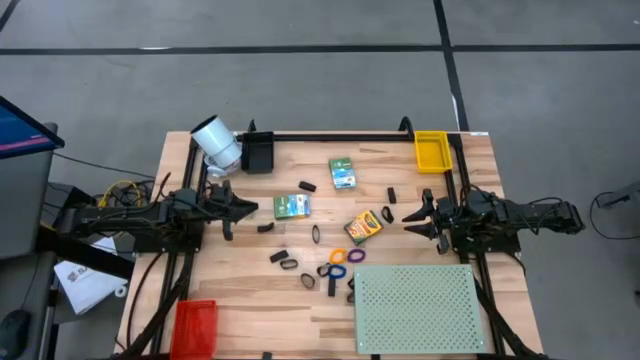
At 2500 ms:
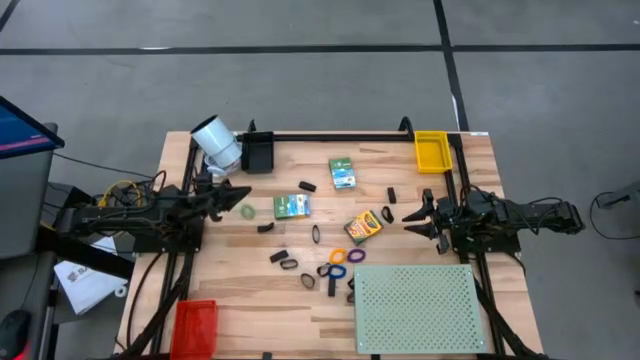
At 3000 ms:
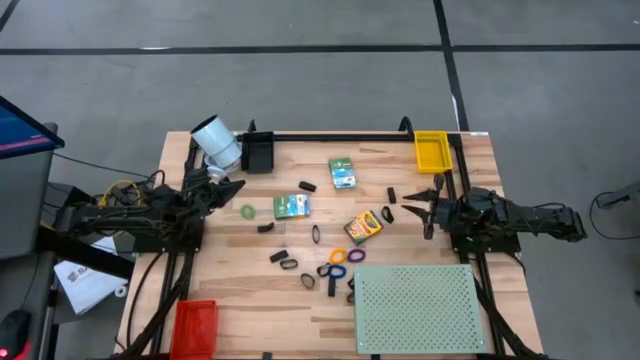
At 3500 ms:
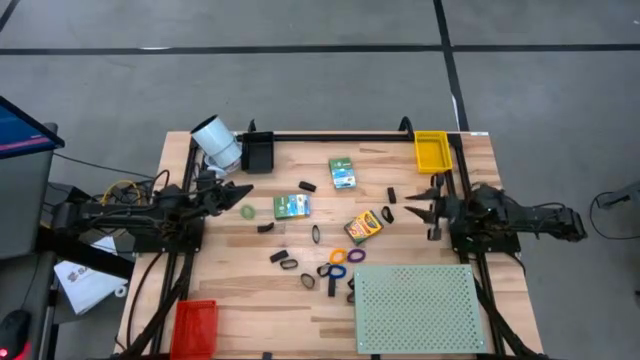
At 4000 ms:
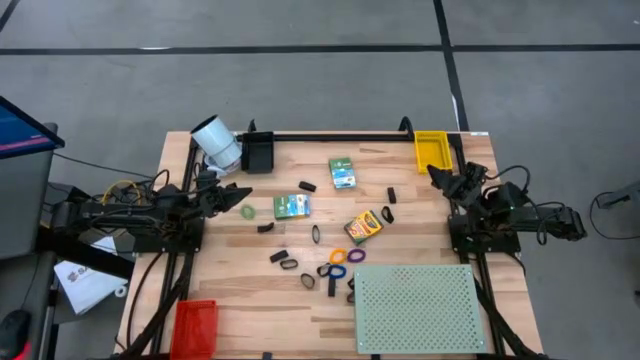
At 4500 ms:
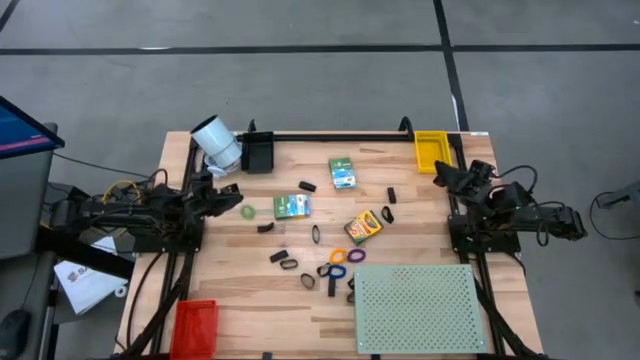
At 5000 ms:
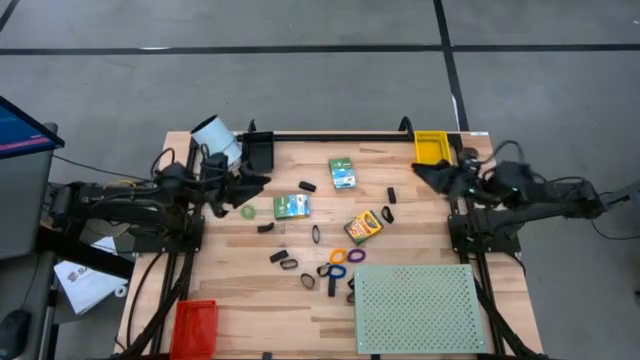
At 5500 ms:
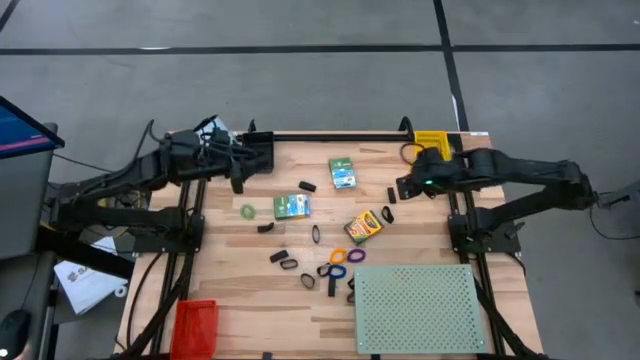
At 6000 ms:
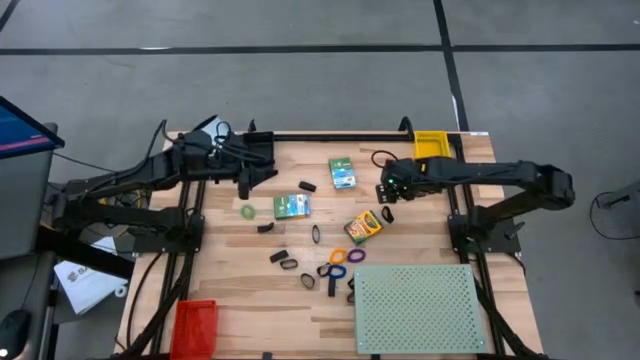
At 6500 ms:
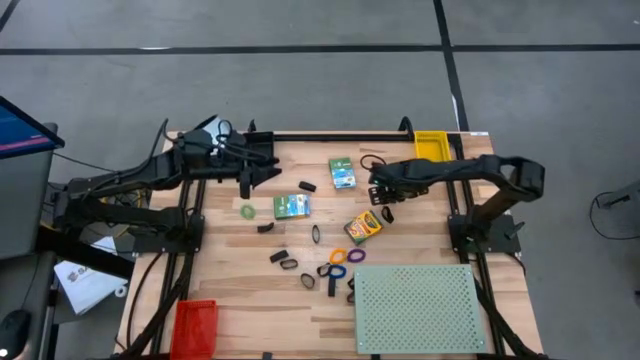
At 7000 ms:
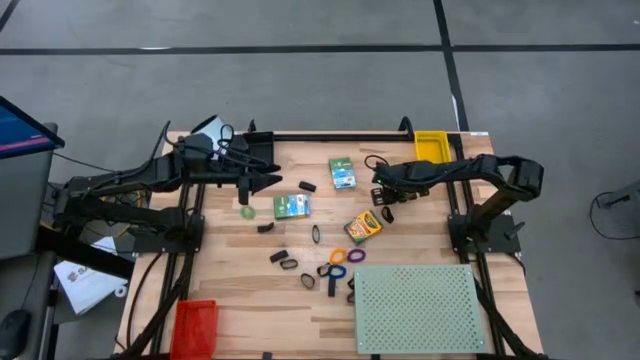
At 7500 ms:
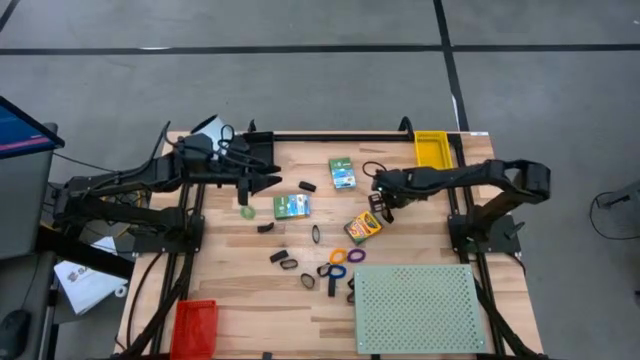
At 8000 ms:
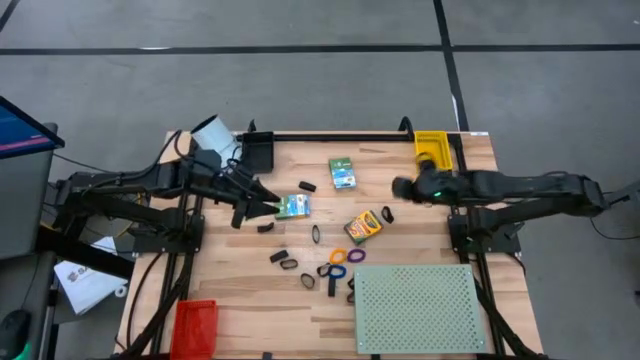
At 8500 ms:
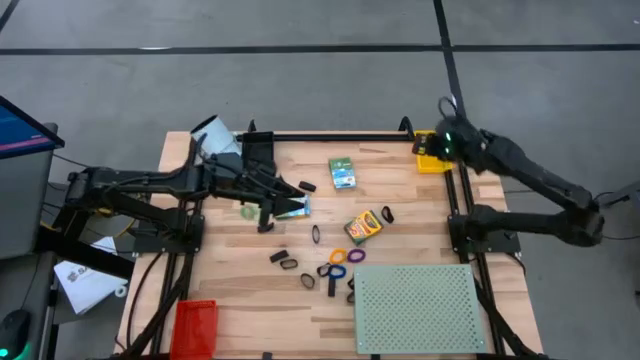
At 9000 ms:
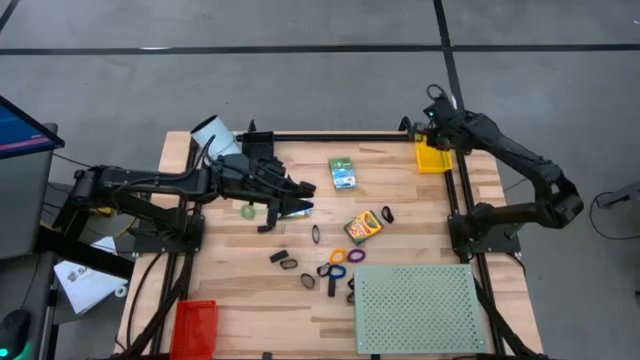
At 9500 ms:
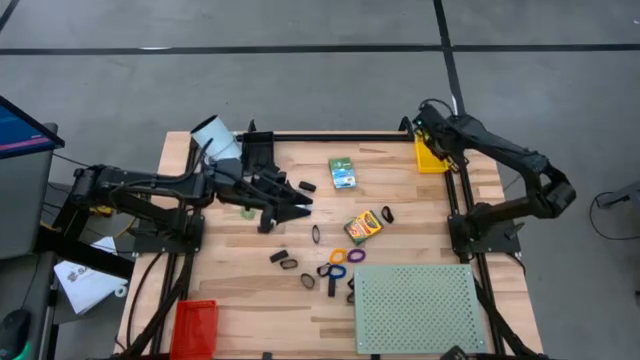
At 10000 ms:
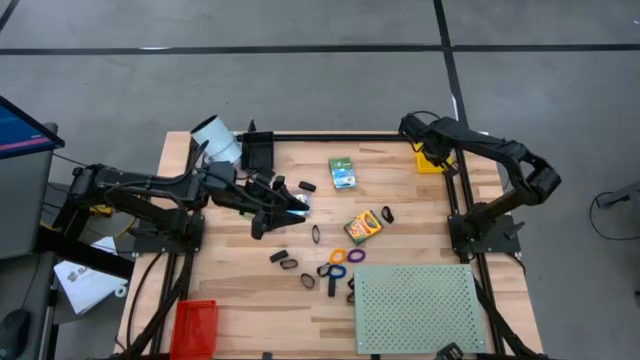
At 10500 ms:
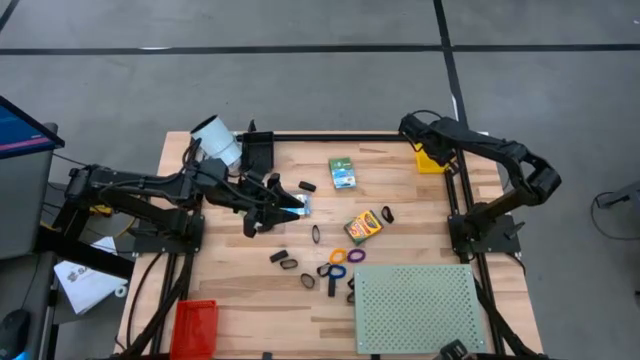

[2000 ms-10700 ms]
Task: Pick & Place Office Desk Supplies
Put the black rubber band into the yellow bin

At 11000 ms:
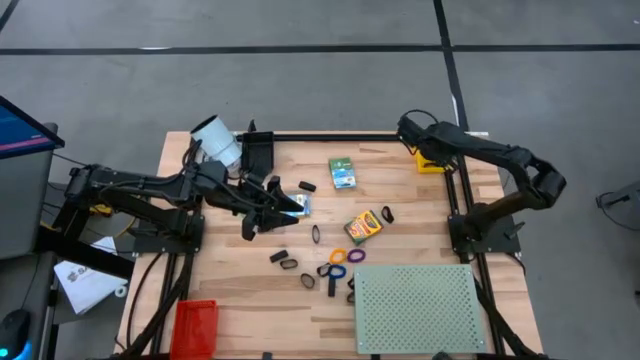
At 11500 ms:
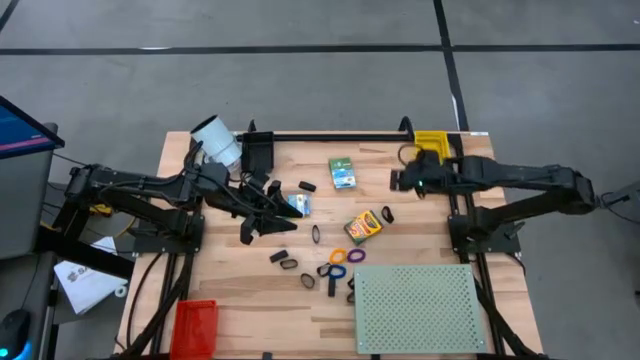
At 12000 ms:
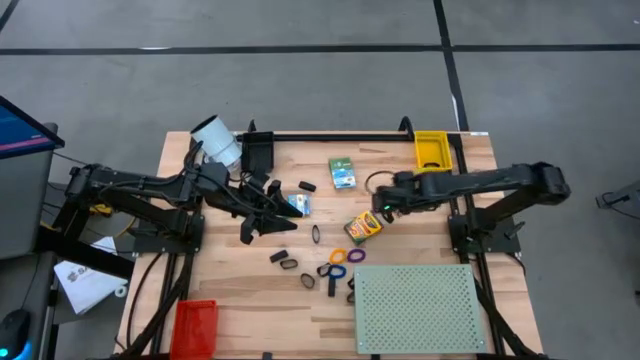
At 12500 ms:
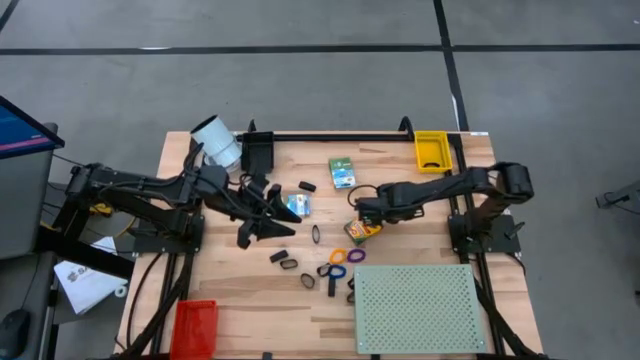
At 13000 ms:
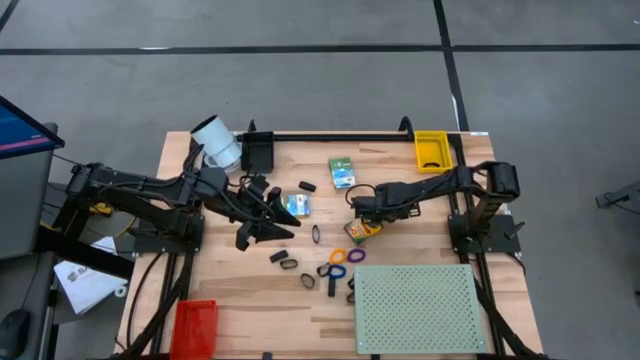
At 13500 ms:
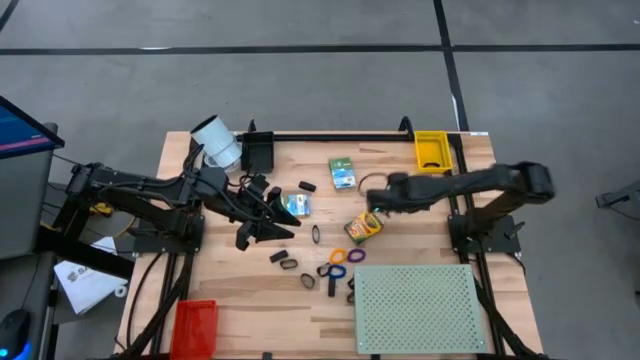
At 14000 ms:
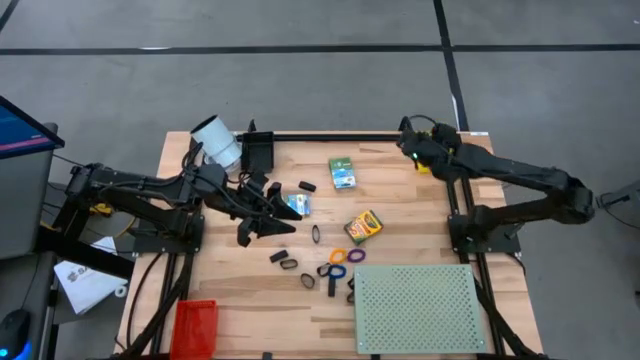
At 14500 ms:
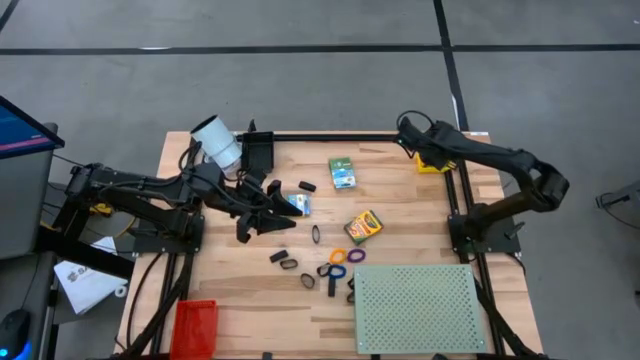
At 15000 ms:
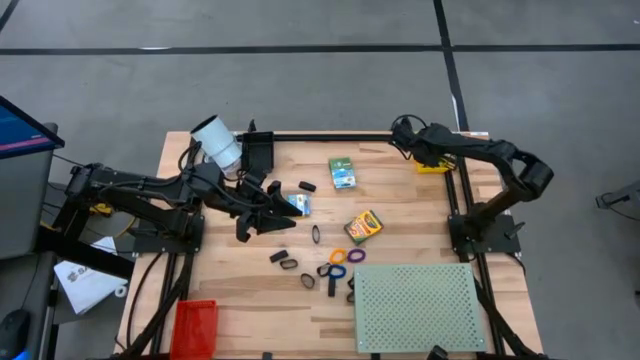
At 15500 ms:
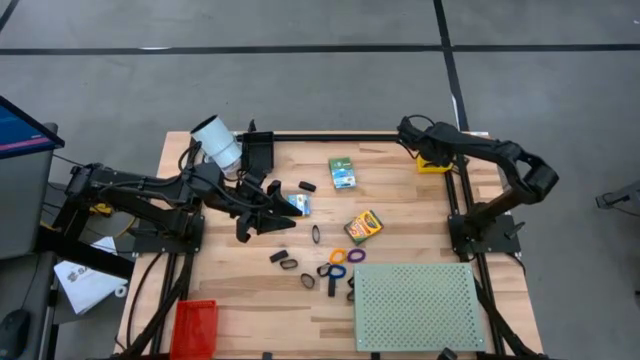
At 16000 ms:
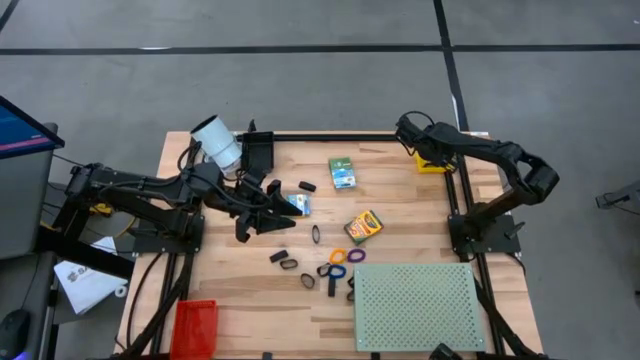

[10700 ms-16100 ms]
Put the black rubber band into the yellow bin

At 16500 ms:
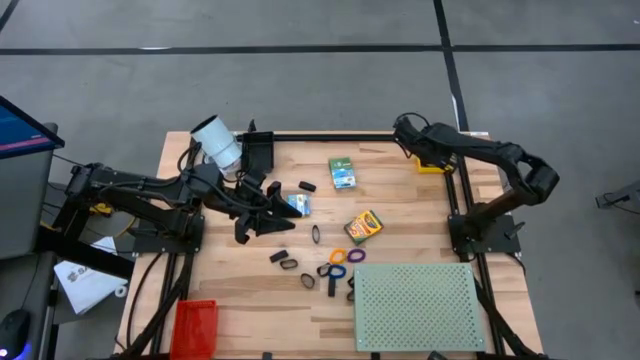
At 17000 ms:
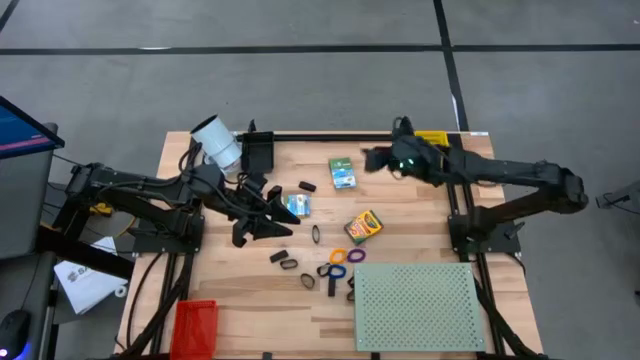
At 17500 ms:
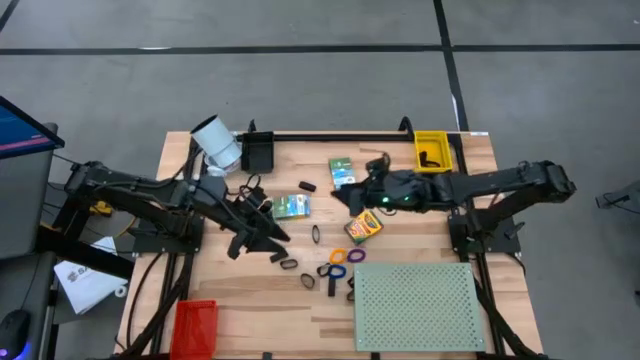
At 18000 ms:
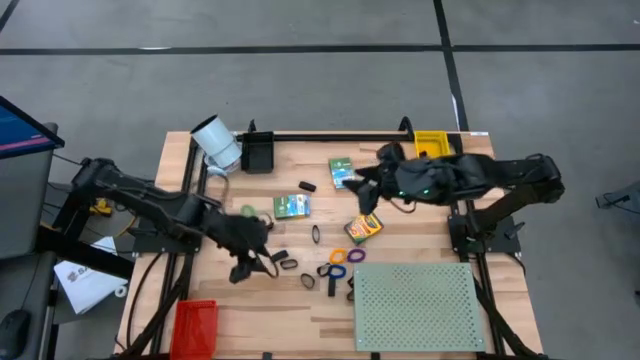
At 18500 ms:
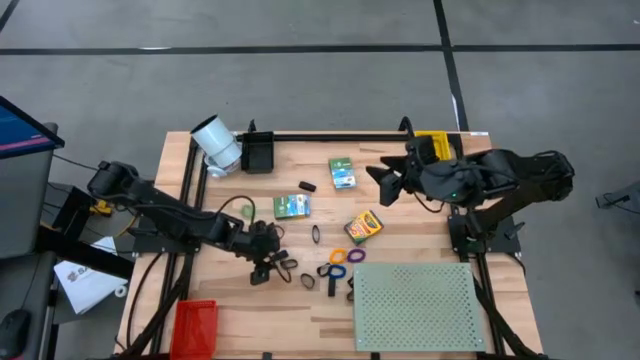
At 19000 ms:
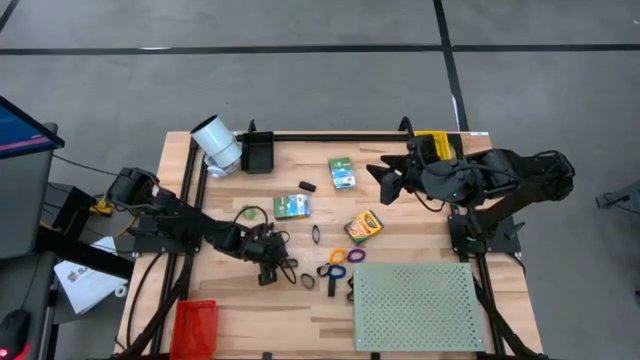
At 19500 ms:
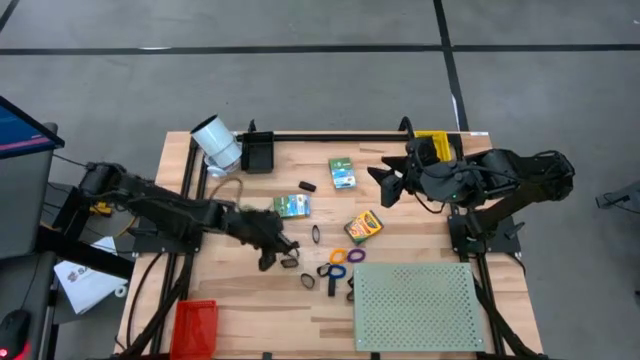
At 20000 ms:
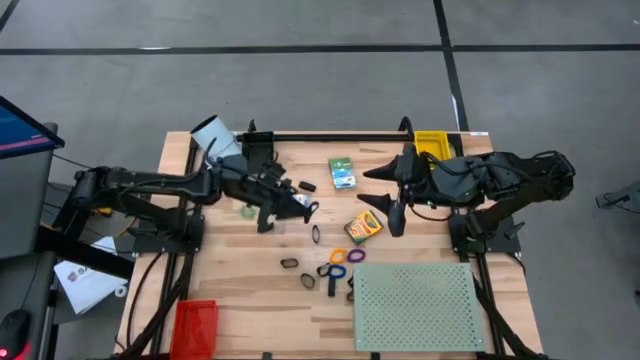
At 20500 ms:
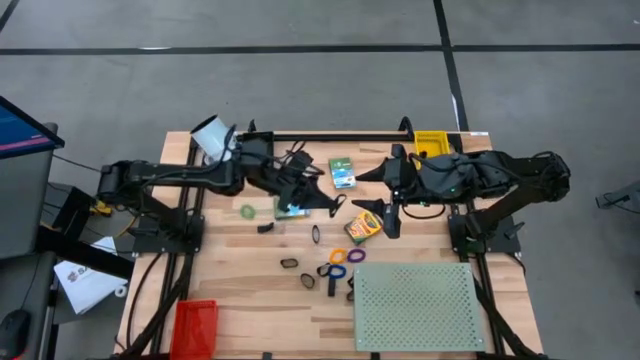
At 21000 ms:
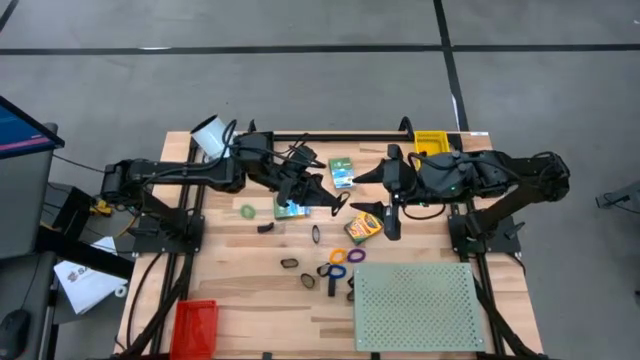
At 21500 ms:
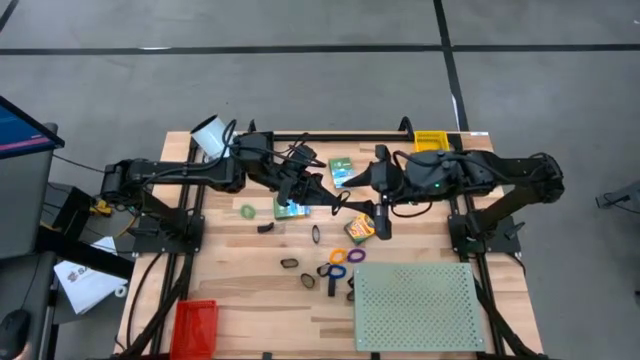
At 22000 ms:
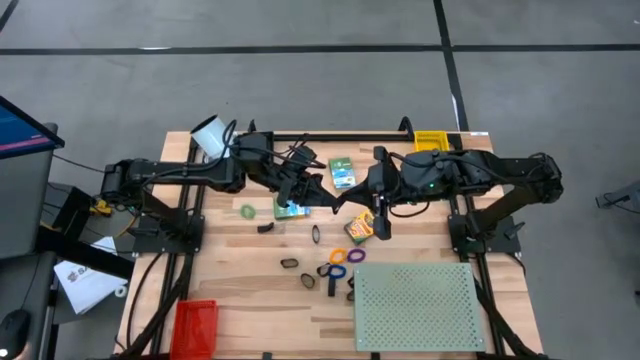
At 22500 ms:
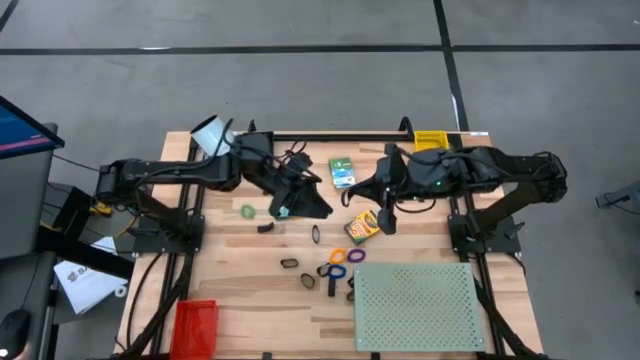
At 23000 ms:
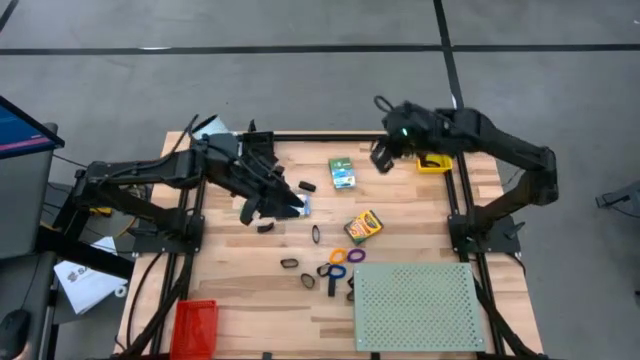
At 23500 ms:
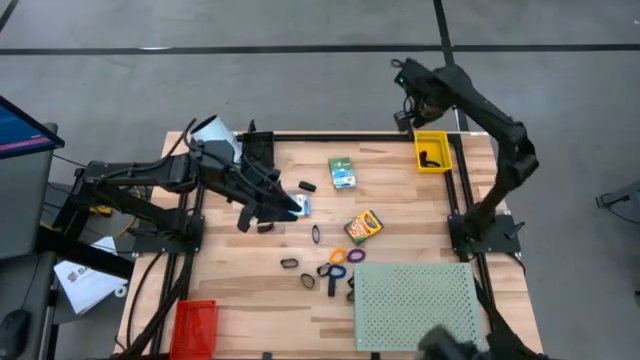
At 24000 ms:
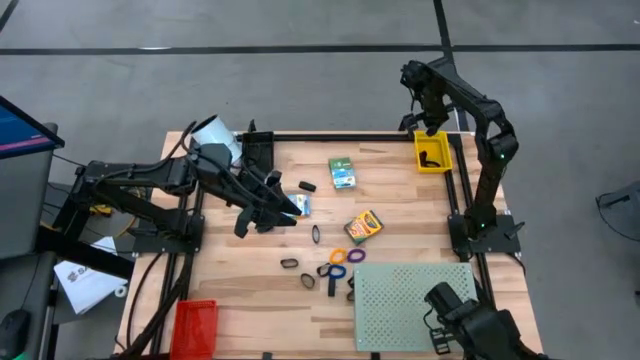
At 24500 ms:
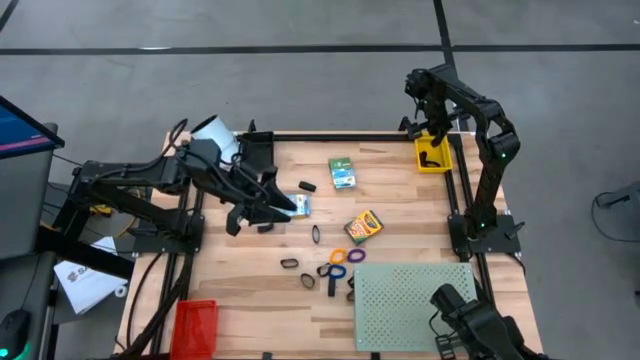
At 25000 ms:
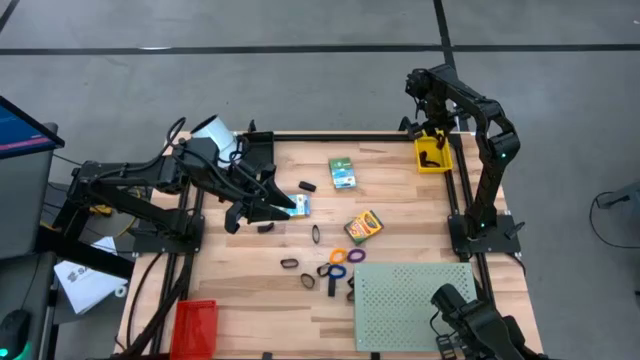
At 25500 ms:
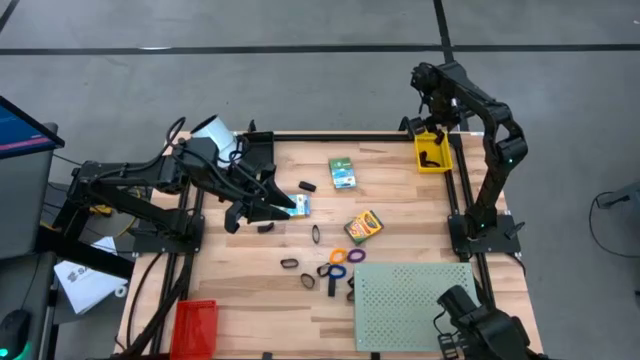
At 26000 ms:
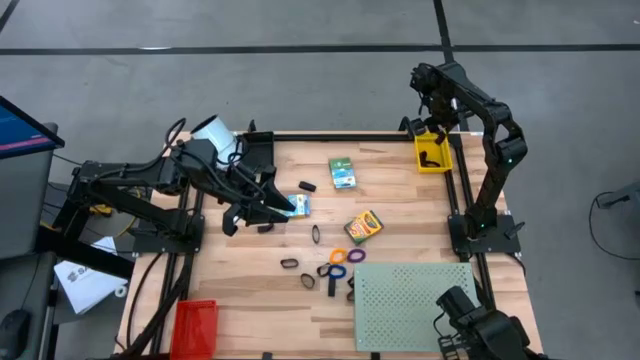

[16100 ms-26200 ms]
Put the black rubber band into the yellow bin
